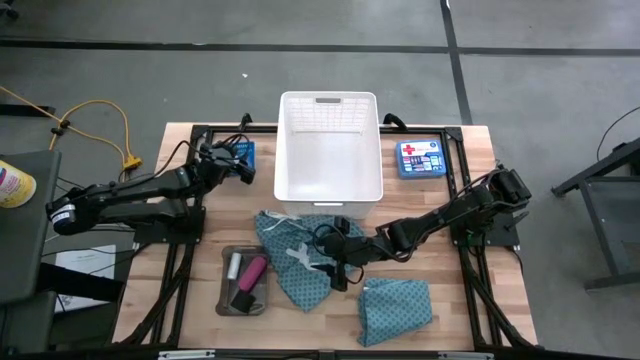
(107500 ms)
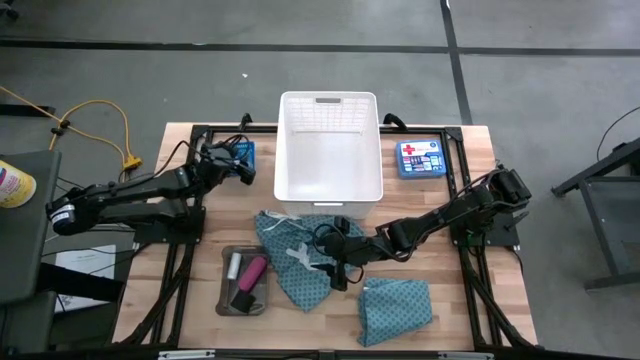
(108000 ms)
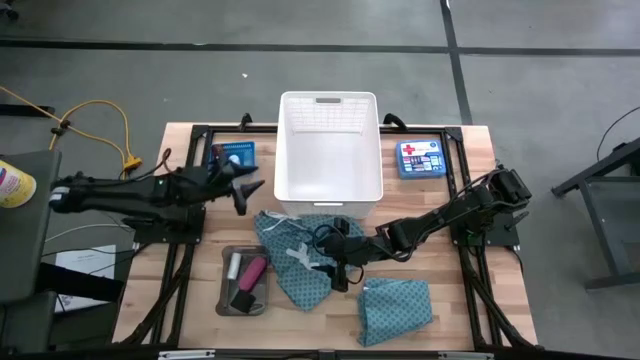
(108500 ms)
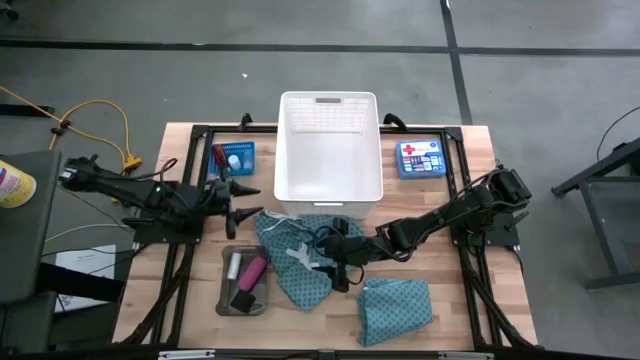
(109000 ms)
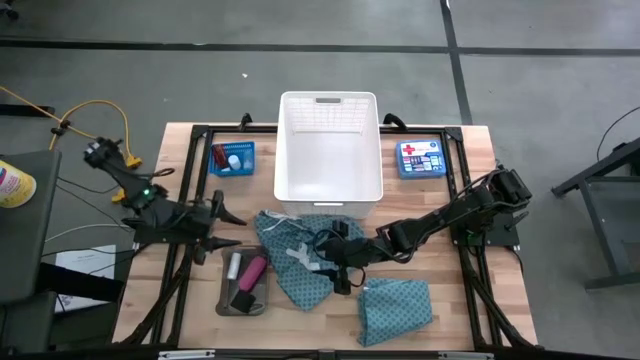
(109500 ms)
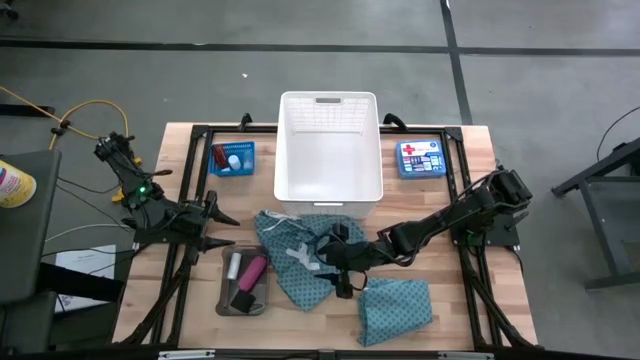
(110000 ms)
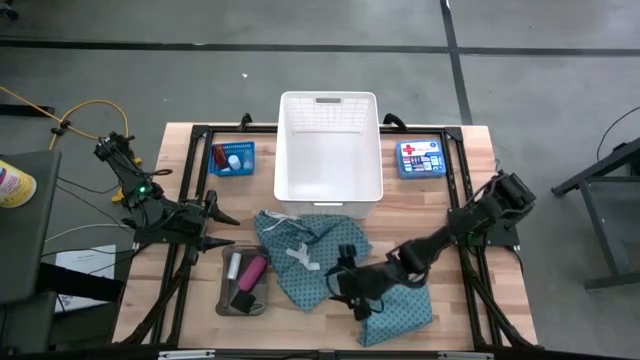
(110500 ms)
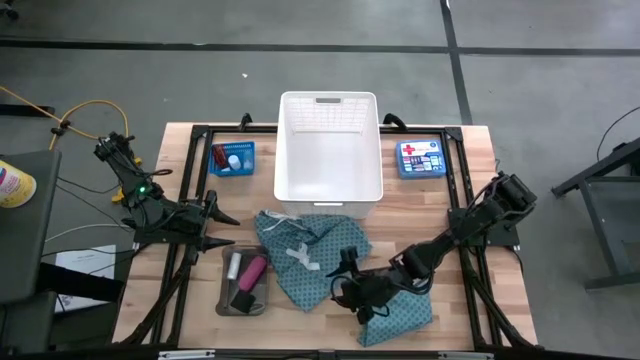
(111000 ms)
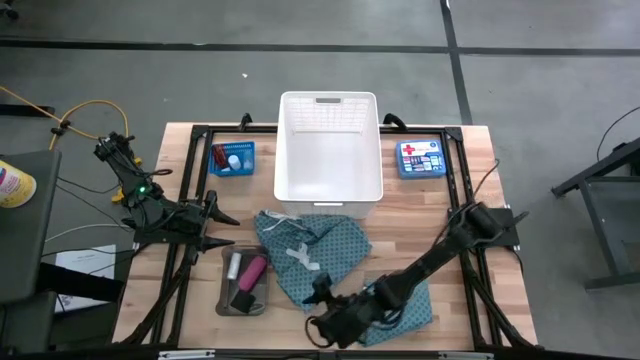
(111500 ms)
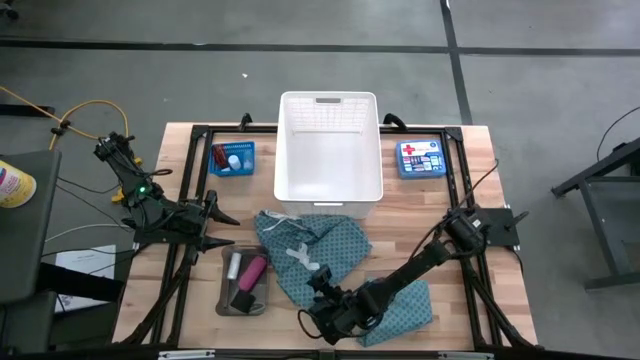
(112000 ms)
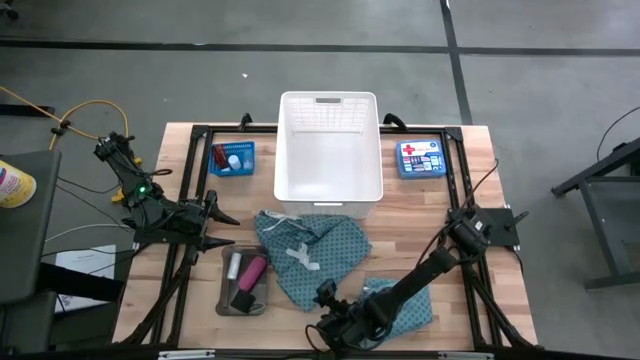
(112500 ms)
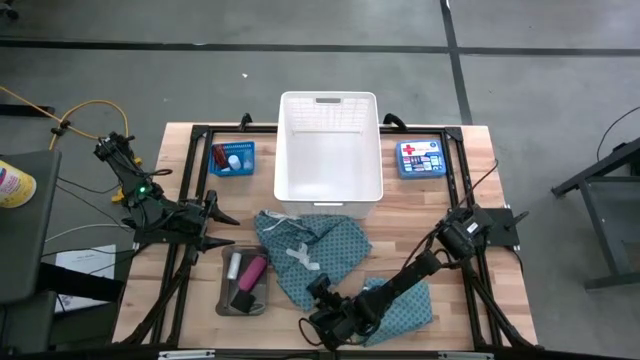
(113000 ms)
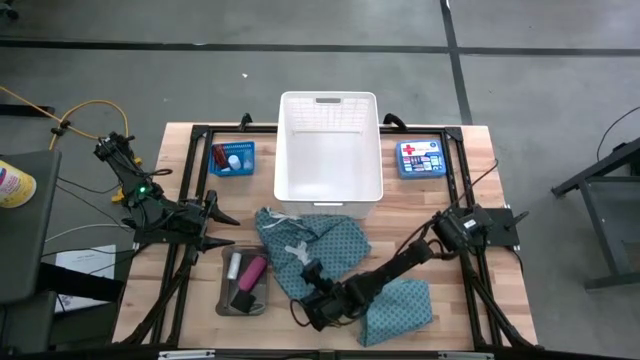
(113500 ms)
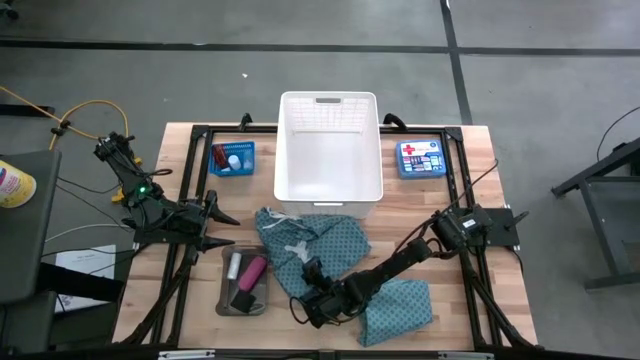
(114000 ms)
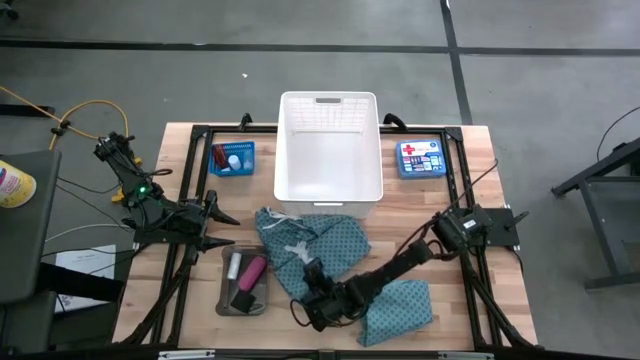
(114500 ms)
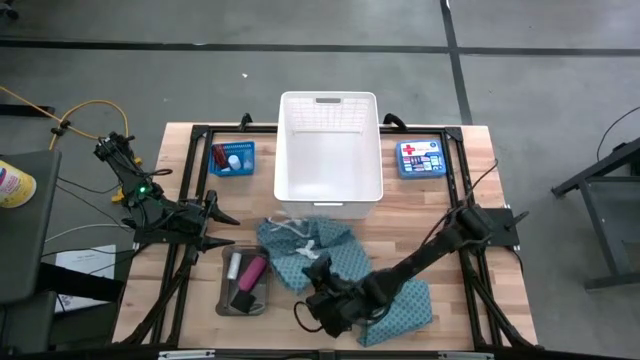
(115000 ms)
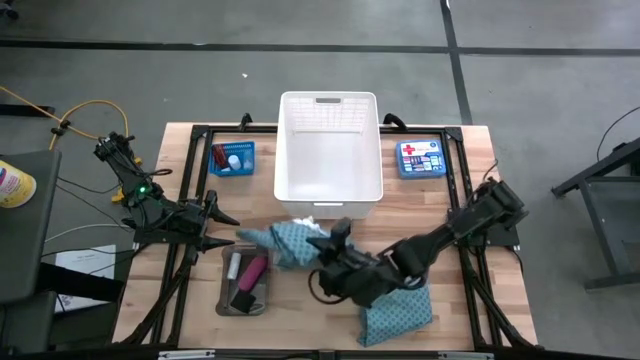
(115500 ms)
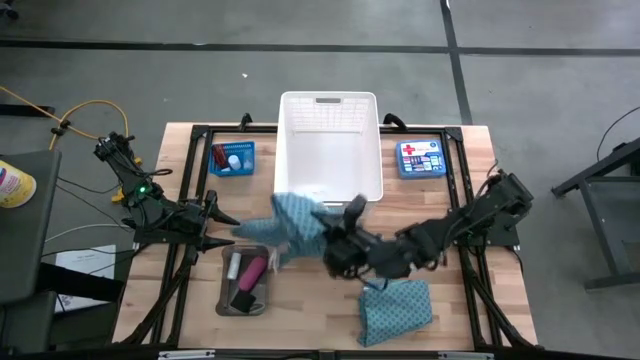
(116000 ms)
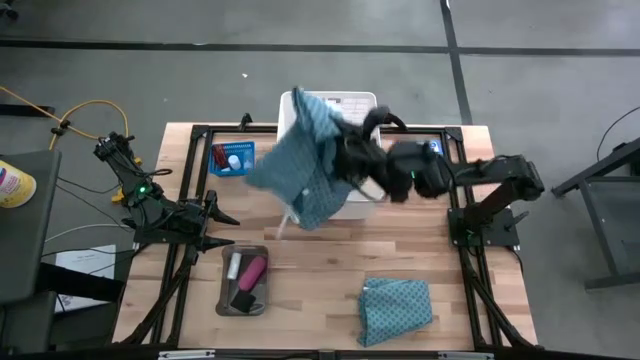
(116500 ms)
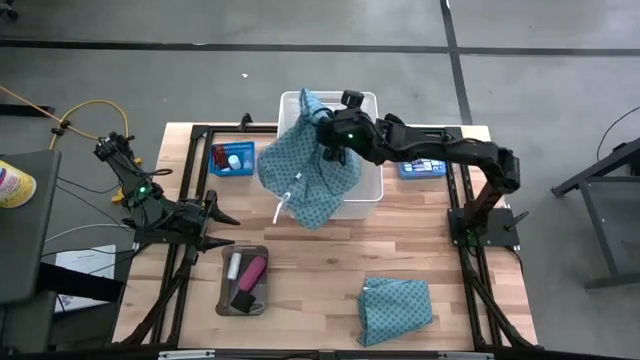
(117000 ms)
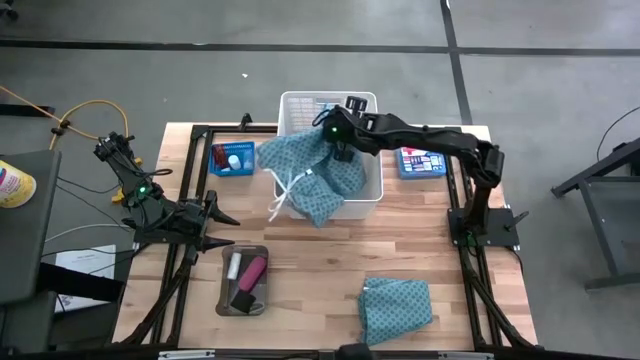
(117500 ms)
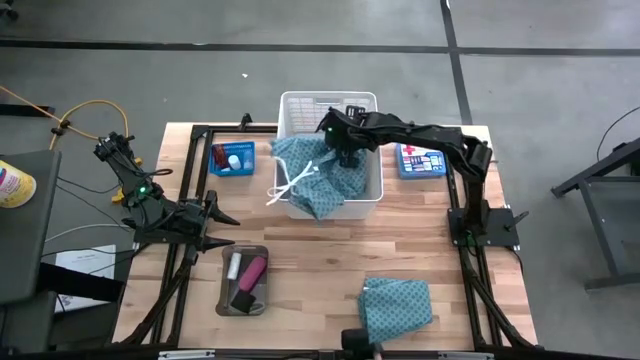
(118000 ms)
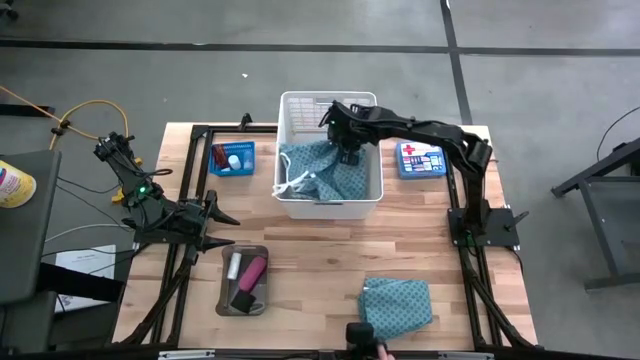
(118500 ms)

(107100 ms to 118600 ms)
Task: Pick & place medical supplies in basket/bin
Put the top blue patient gown into the white bin

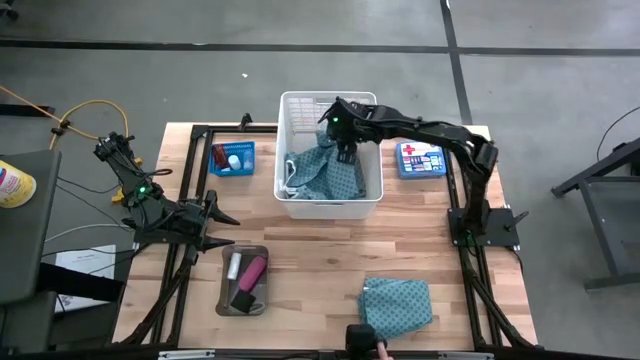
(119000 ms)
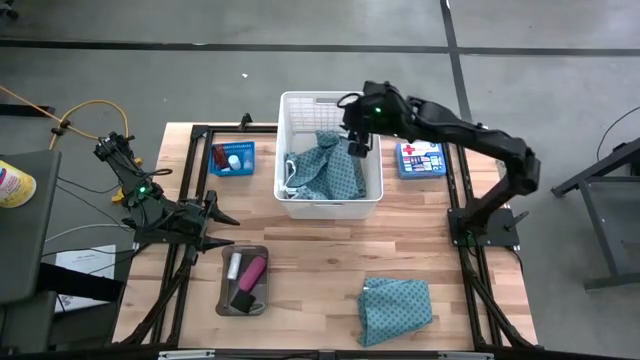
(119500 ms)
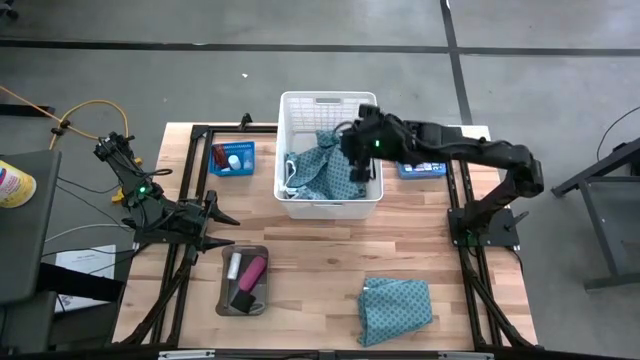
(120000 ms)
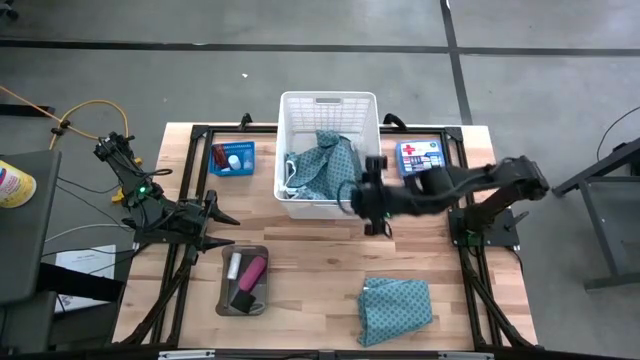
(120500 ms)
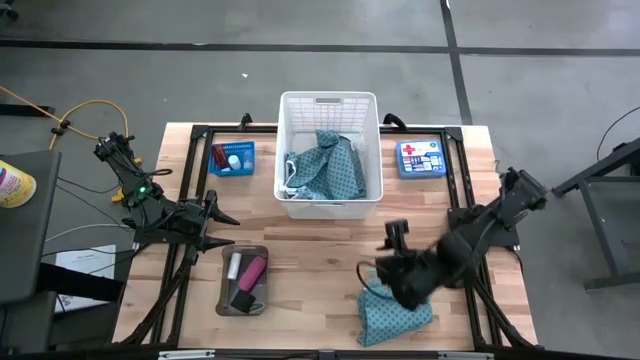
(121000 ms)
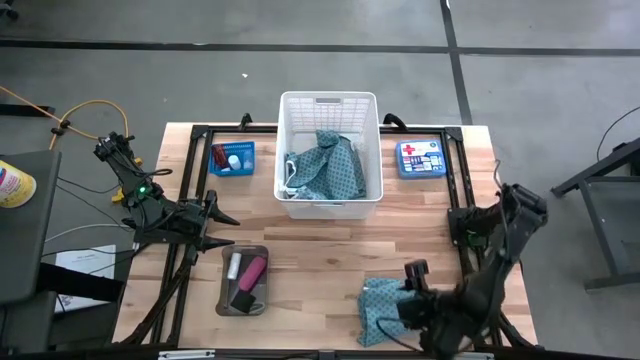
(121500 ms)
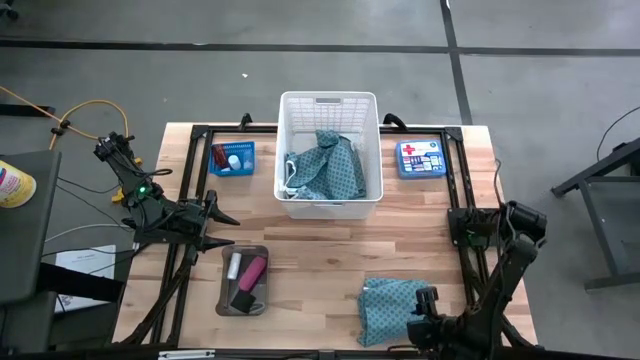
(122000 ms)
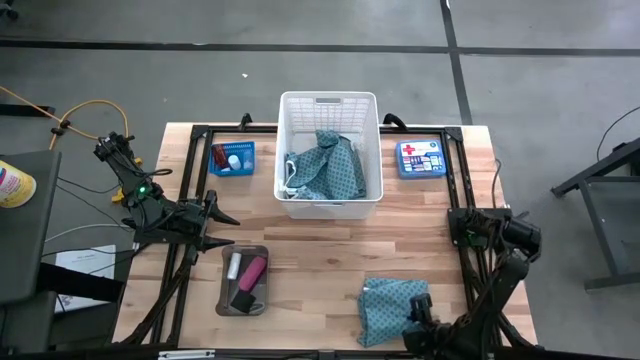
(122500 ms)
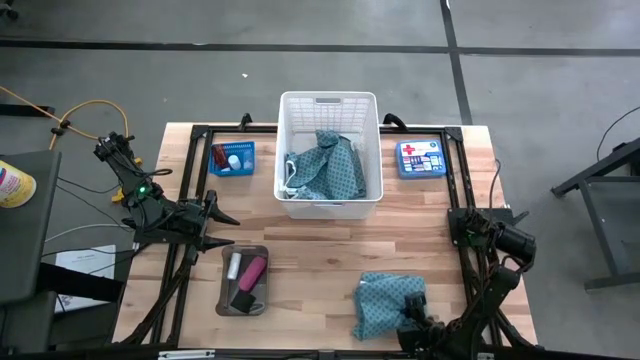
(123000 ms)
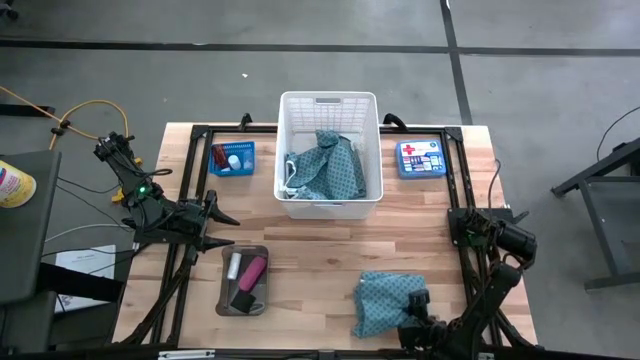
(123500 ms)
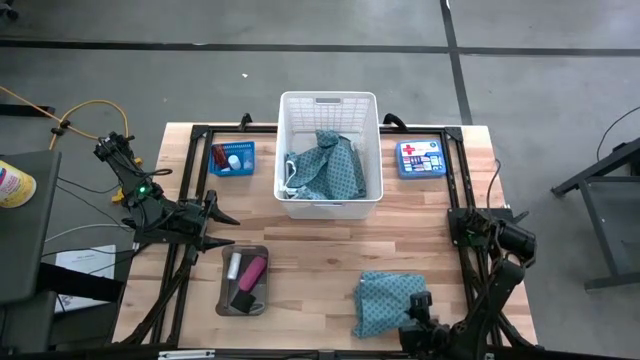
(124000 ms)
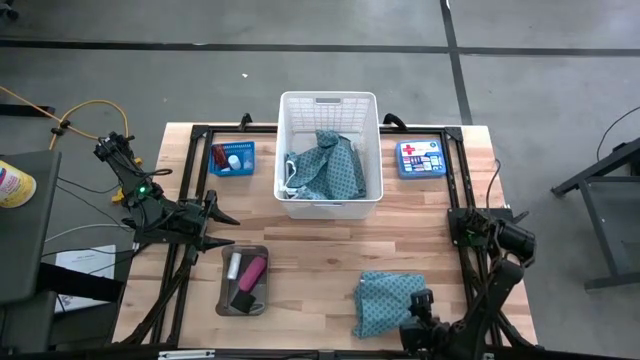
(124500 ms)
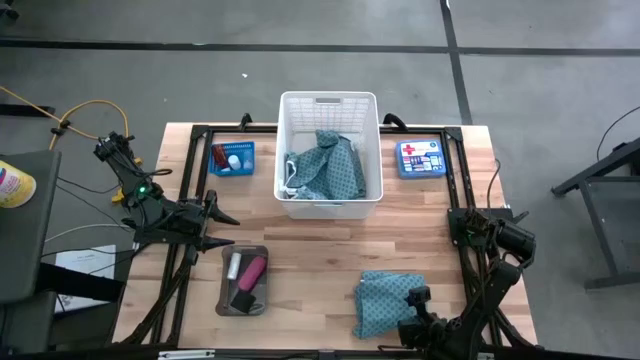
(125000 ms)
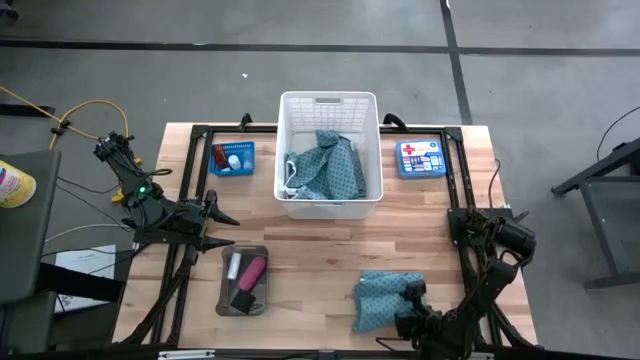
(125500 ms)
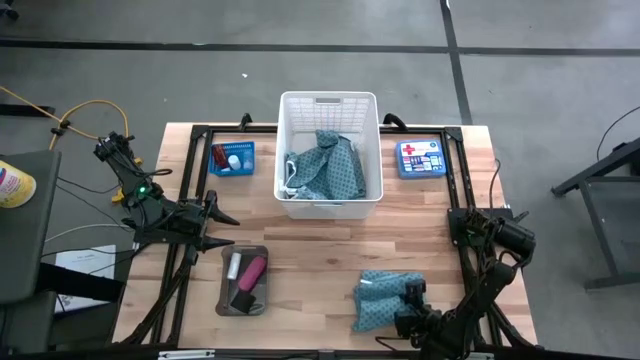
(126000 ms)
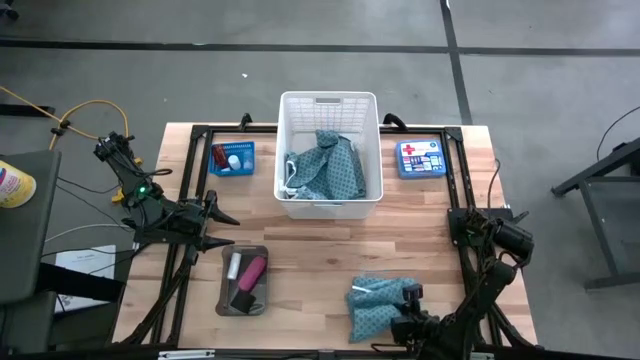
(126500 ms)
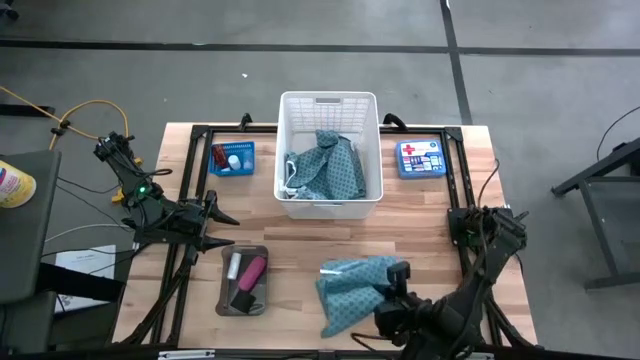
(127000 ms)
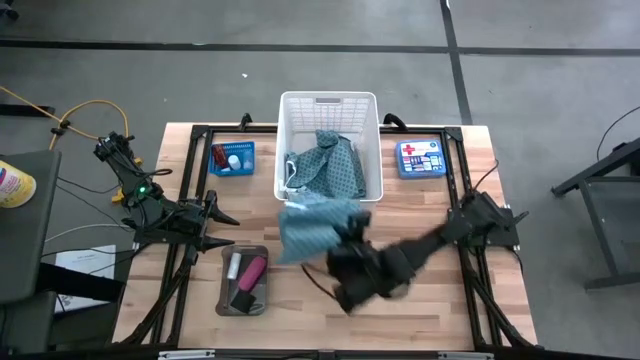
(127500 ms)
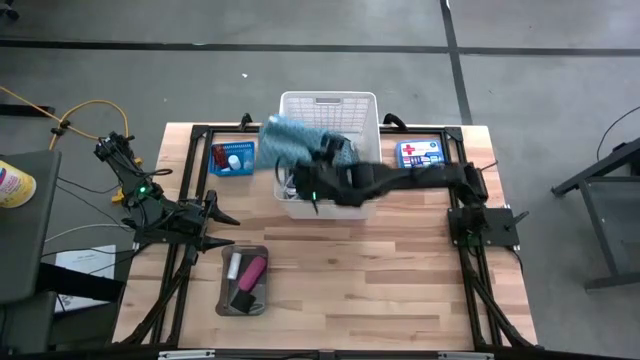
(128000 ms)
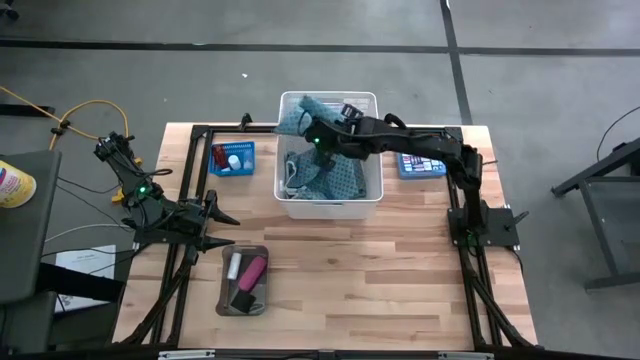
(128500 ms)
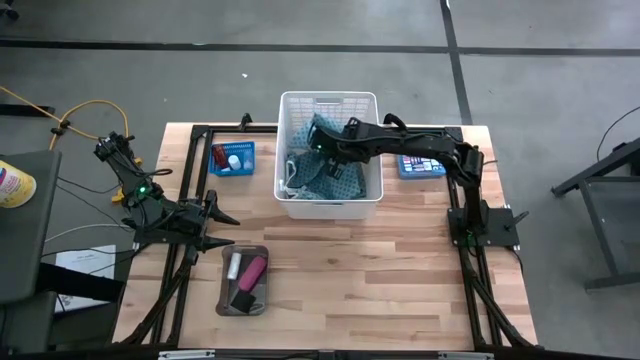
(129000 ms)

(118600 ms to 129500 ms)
Put the blue patient gown into the white bin
